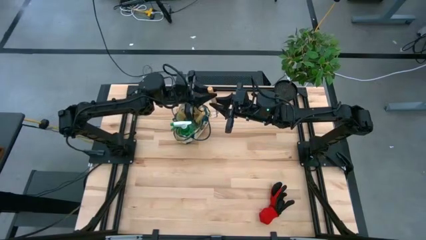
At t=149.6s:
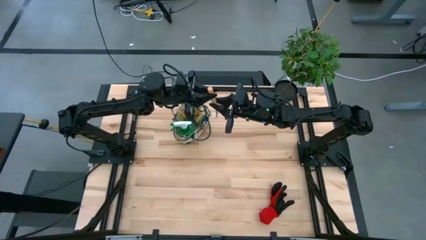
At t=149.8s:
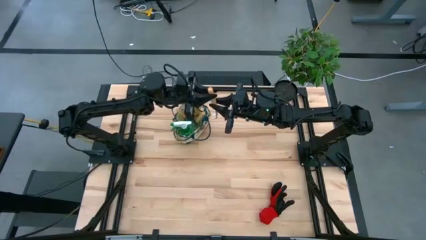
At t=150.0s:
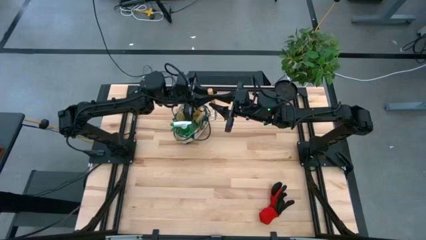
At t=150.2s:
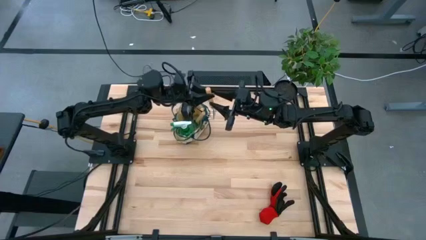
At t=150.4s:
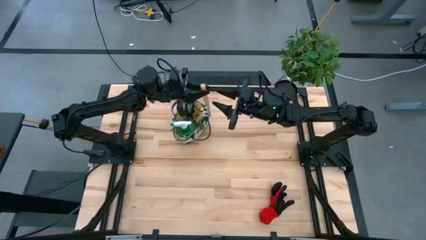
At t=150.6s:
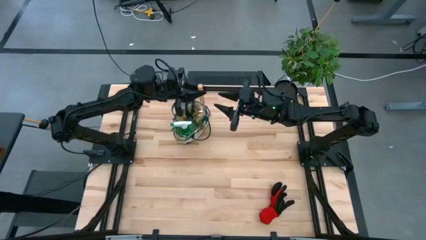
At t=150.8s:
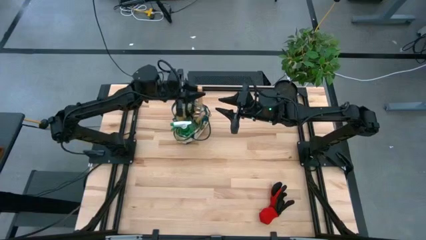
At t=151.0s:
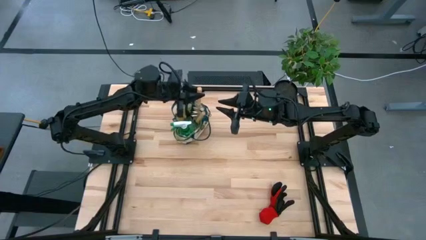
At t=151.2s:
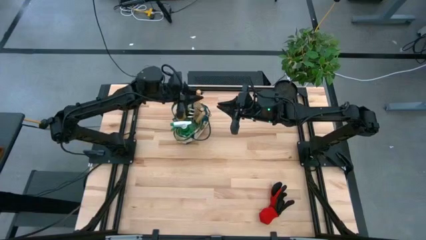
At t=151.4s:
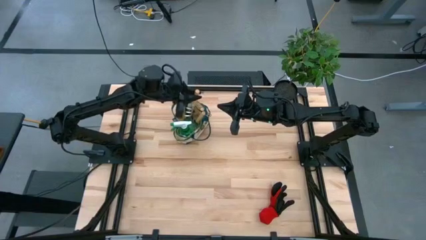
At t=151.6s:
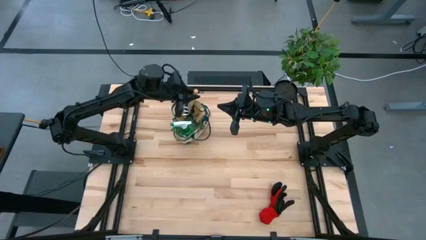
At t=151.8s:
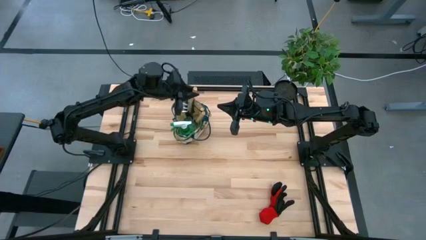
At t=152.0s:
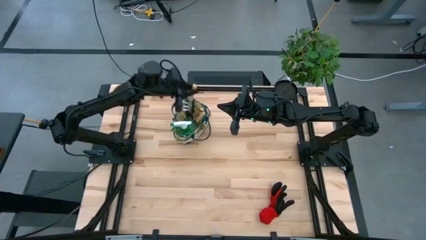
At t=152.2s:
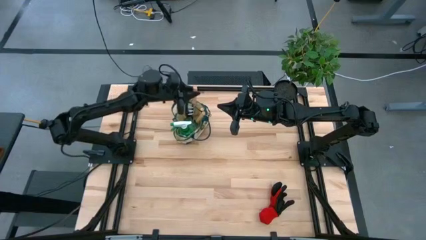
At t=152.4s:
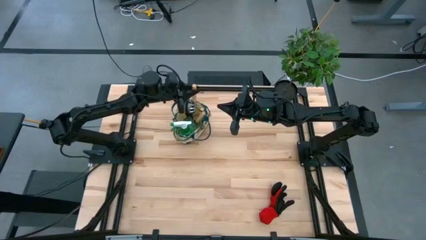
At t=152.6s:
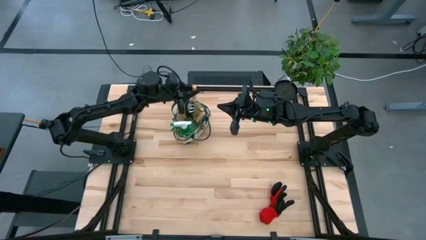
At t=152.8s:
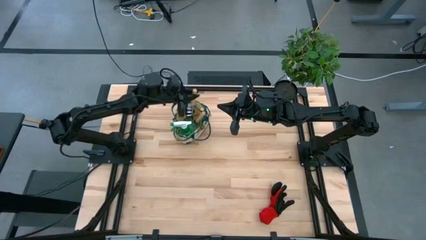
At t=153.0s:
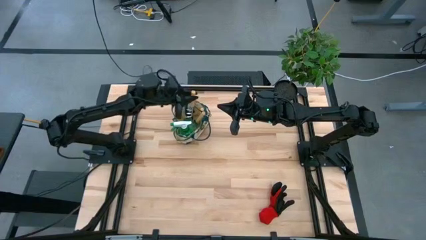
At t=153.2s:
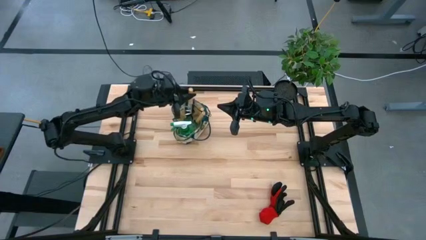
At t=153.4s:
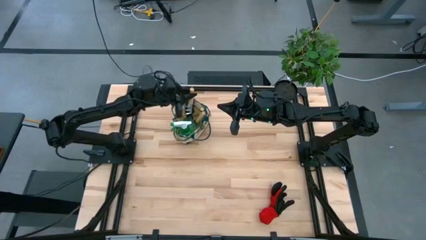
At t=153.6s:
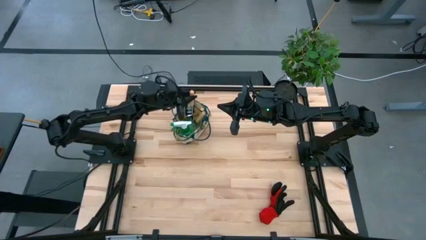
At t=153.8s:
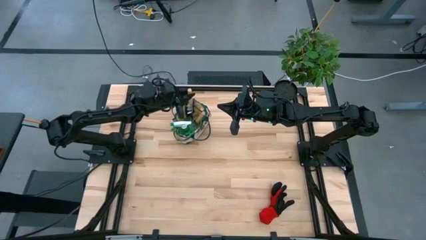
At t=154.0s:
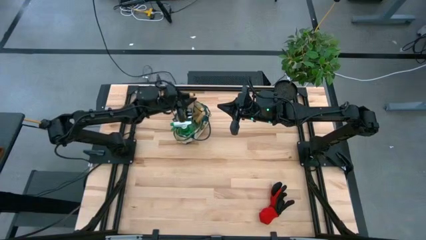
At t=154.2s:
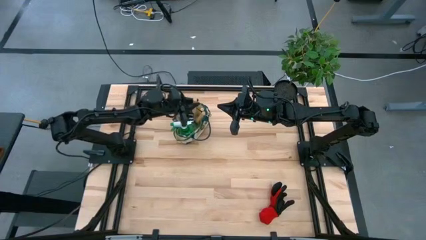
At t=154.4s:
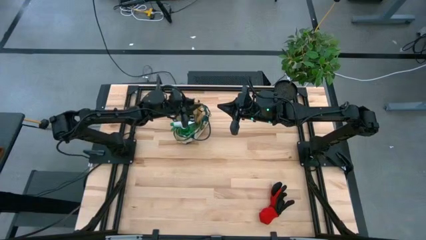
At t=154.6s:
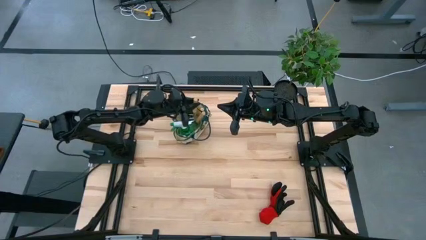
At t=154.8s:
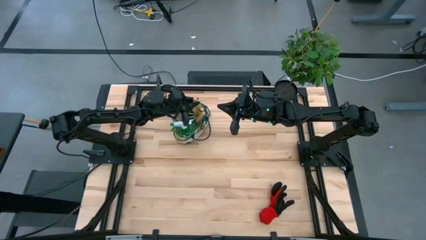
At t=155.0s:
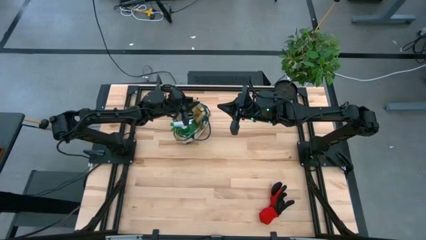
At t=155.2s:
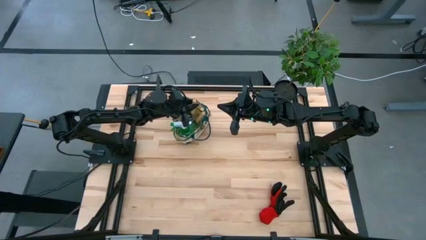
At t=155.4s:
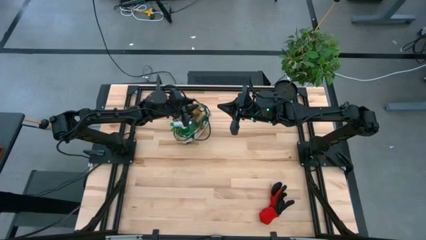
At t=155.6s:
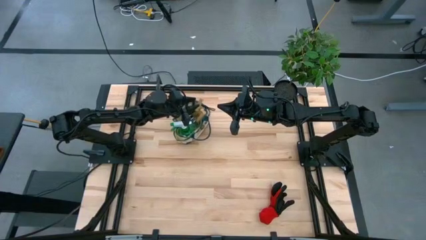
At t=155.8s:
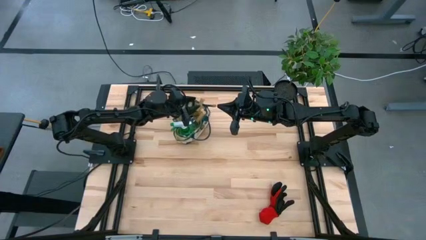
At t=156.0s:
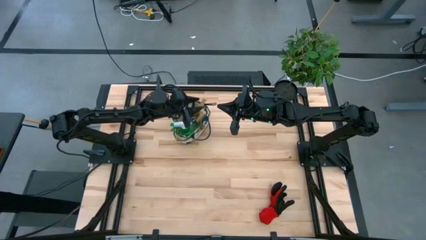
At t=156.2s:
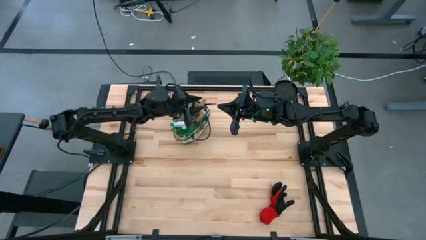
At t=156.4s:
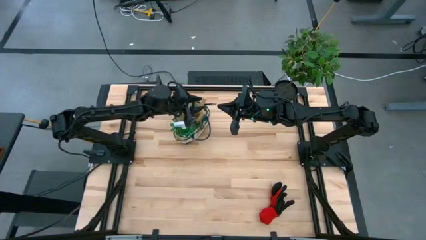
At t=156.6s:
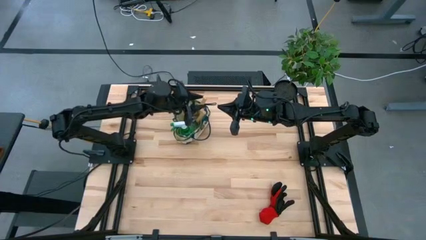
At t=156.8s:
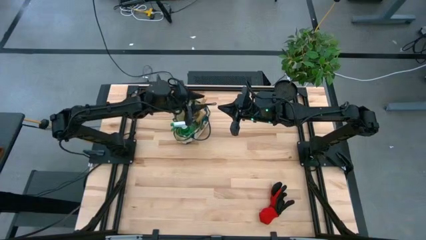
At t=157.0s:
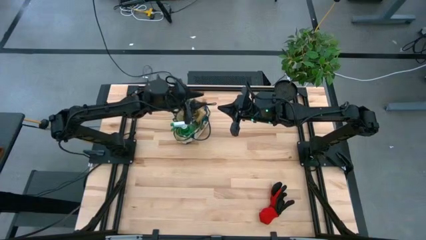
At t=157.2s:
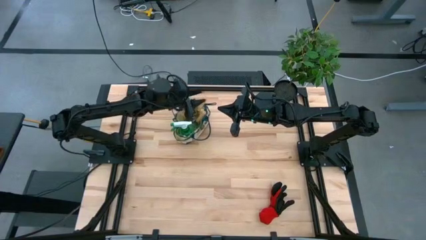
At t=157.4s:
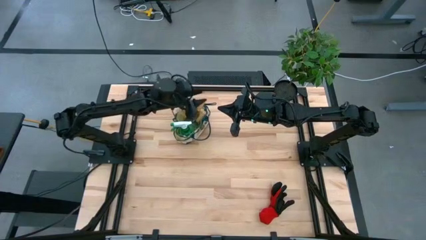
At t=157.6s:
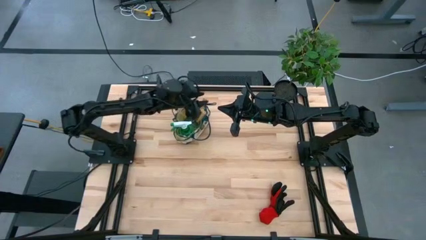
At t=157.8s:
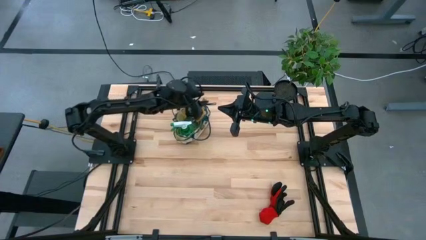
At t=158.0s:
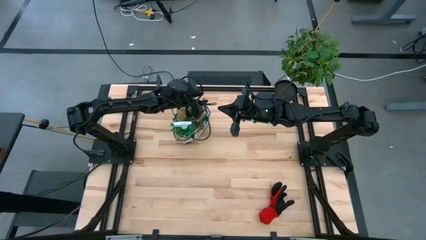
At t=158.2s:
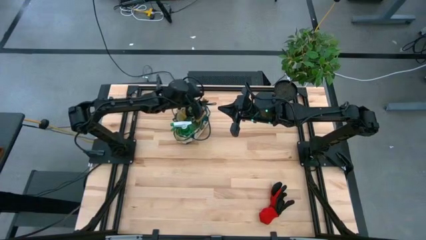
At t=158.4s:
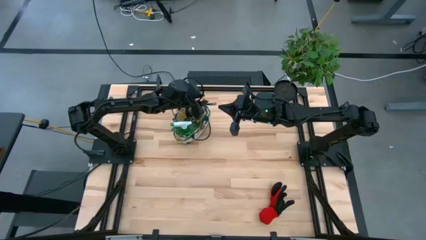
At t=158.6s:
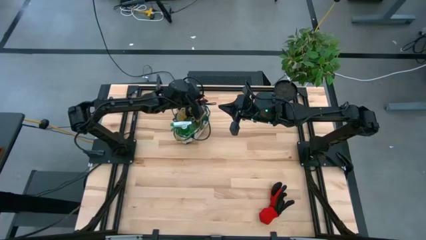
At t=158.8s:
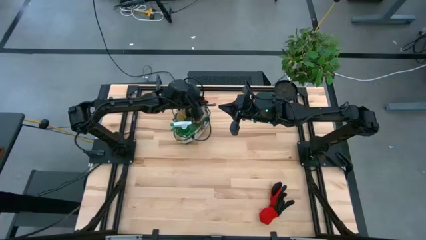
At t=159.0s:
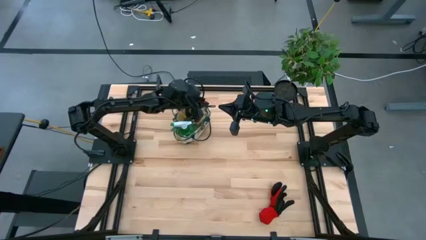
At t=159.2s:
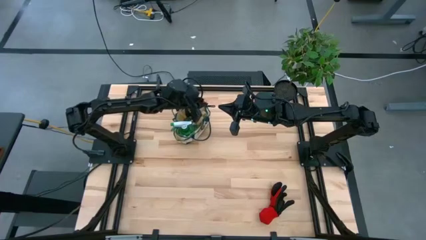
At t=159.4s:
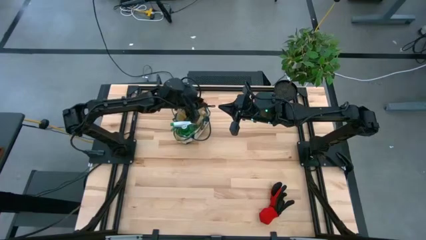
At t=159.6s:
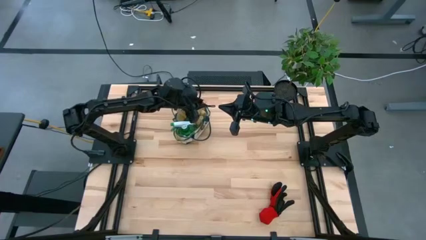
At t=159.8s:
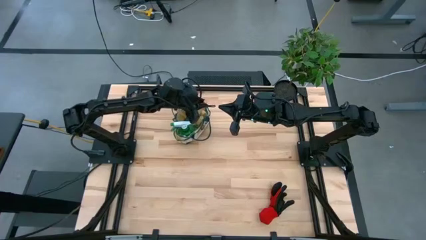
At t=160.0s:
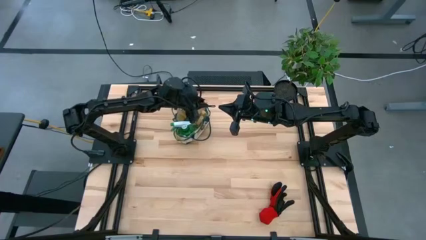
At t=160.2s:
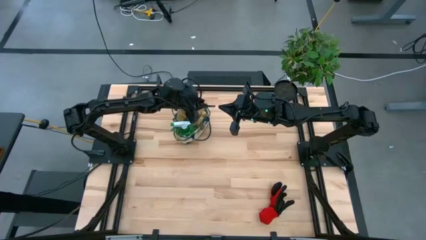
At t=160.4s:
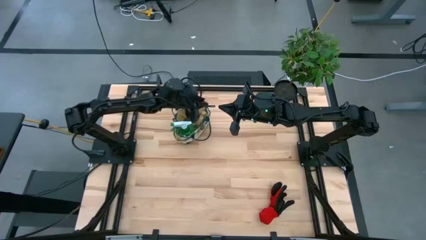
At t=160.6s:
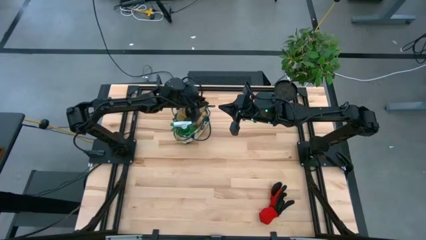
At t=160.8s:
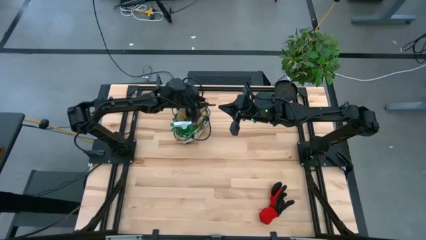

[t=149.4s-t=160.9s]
Task: Pick & Place Garden tools in Gardening bag
Put the brown hand rake into the gardening bag
